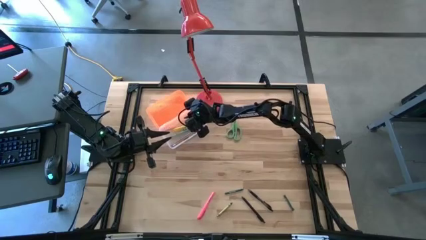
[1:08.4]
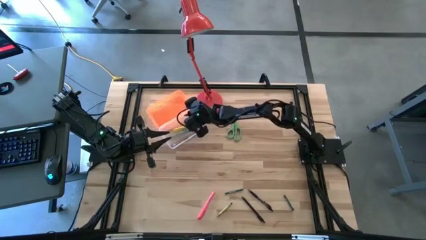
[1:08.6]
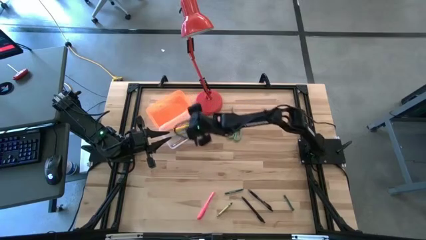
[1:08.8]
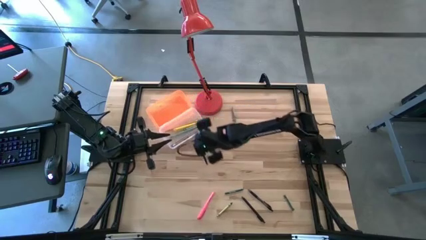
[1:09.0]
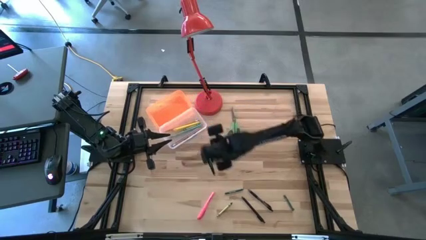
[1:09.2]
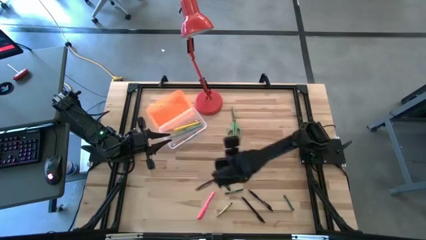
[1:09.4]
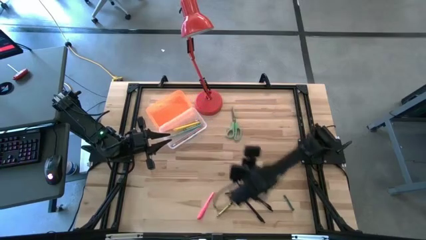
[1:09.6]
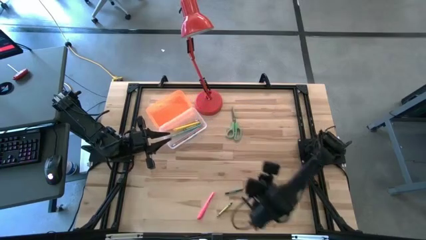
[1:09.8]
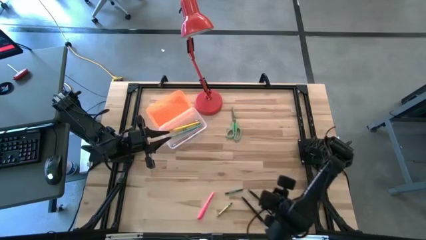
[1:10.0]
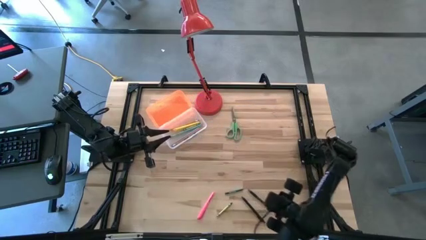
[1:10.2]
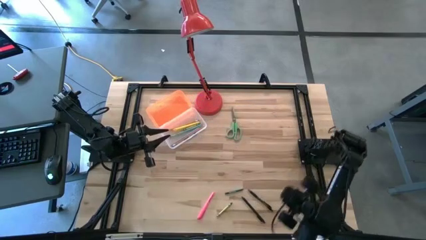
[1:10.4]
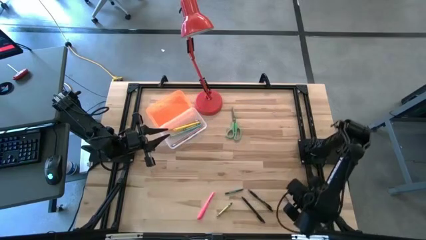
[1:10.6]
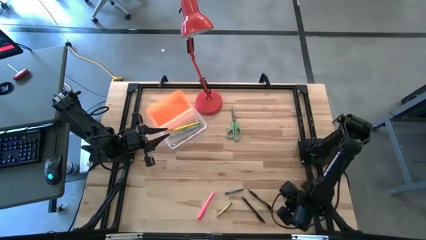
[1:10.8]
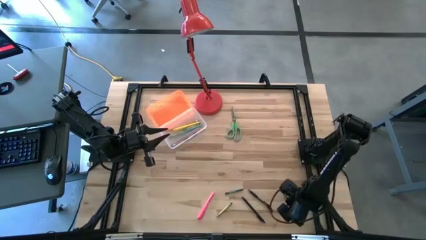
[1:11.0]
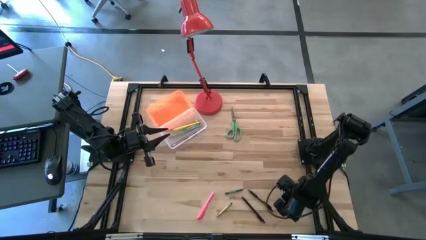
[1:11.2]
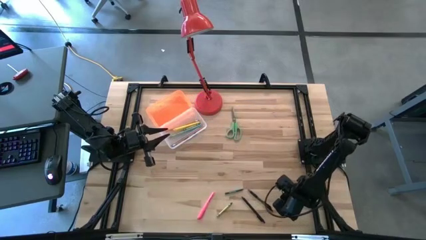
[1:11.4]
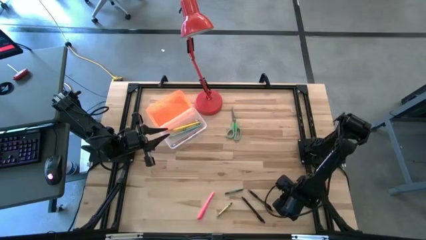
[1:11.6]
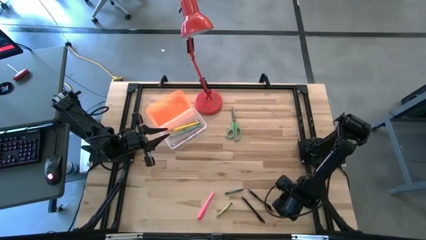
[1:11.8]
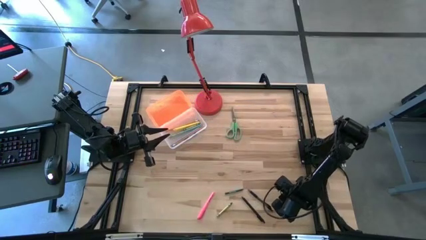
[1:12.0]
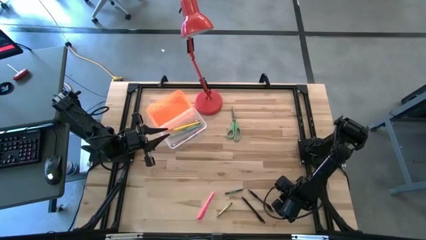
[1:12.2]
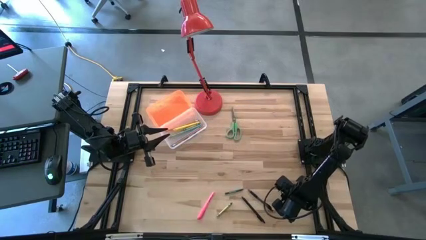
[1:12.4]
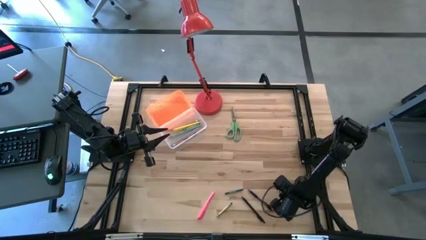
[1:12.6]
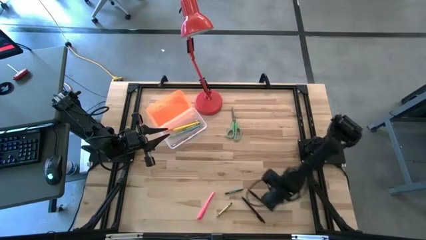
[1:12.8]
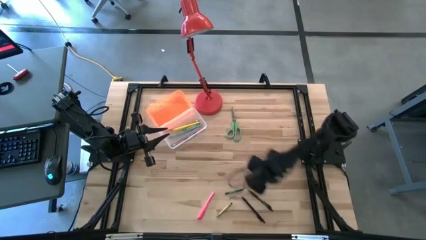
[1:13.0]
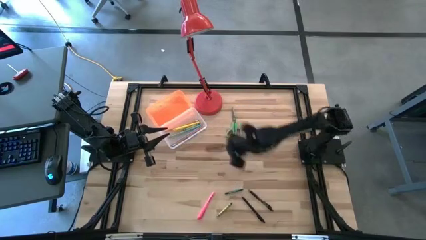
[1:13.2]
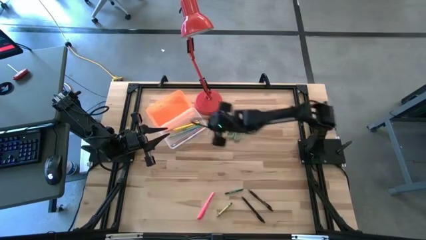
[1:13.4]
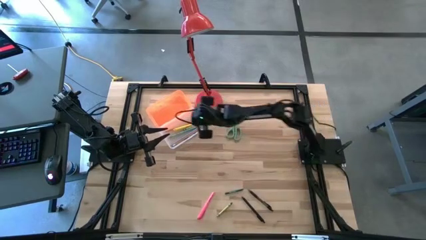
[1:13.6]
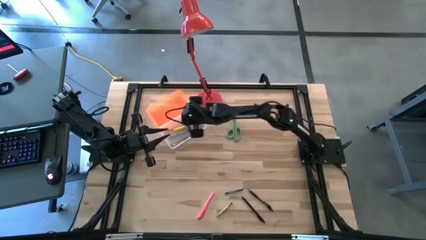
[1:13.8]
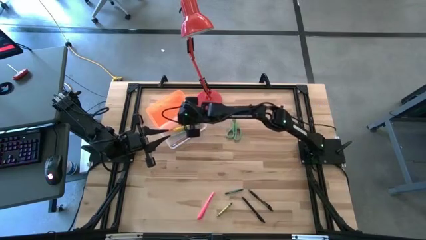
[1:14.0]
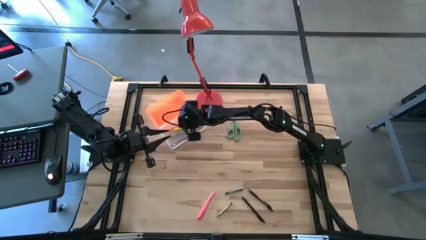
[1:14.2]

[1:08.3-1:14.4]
Task: Pick & place school supplies into a supply box
Put the right green crayon into the orange supply box

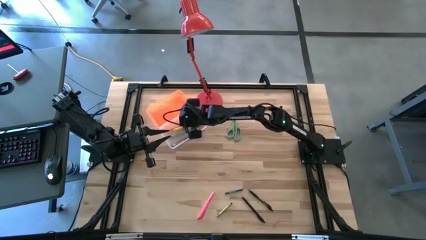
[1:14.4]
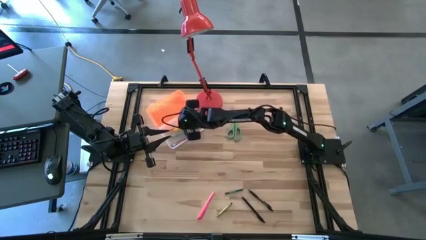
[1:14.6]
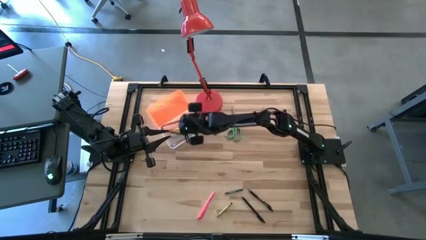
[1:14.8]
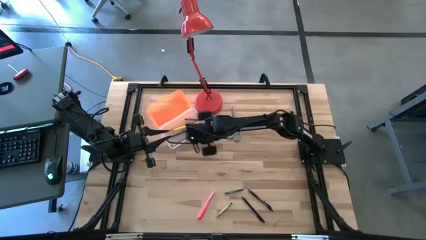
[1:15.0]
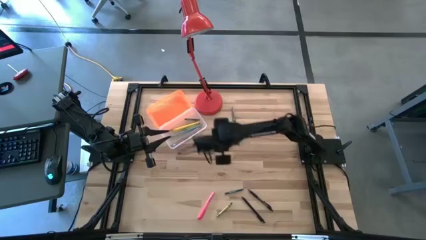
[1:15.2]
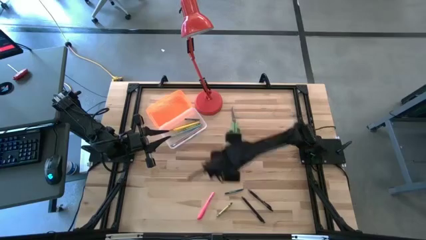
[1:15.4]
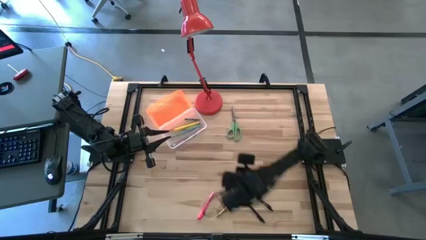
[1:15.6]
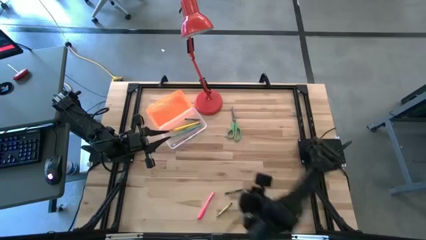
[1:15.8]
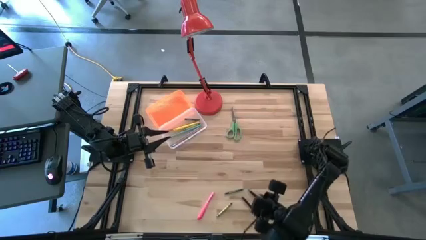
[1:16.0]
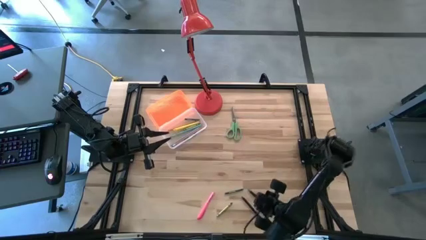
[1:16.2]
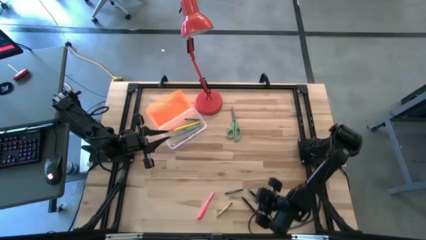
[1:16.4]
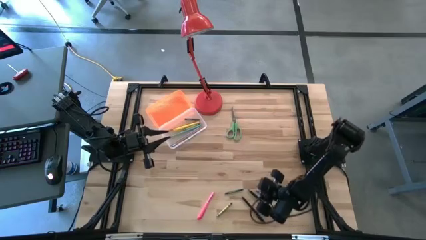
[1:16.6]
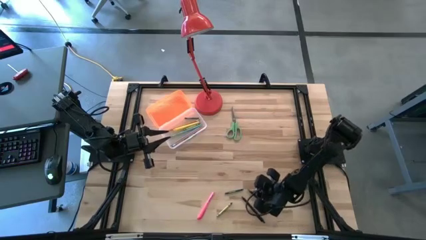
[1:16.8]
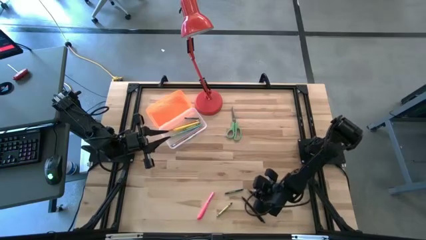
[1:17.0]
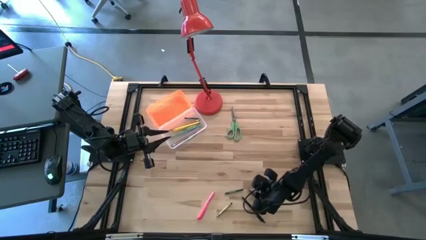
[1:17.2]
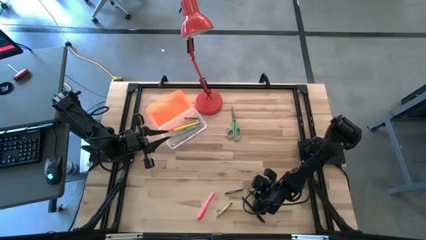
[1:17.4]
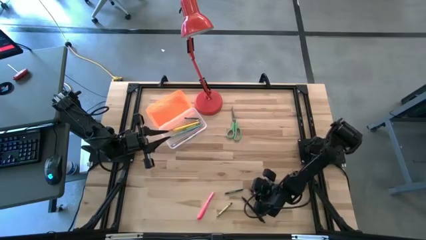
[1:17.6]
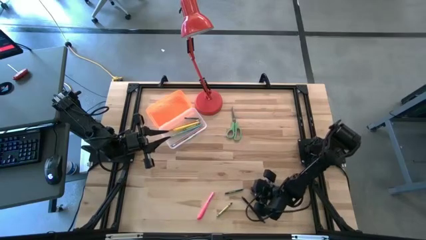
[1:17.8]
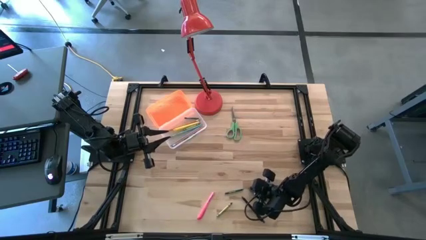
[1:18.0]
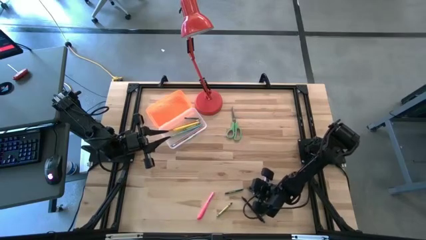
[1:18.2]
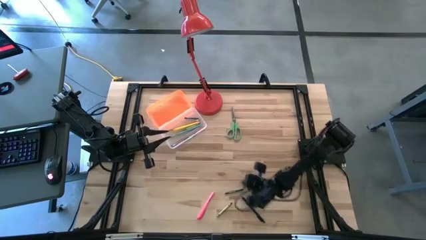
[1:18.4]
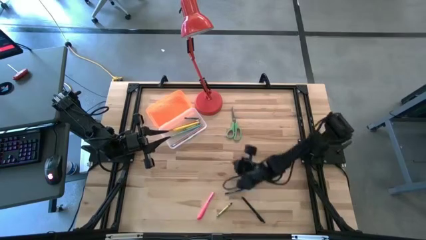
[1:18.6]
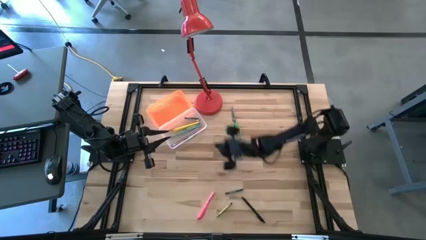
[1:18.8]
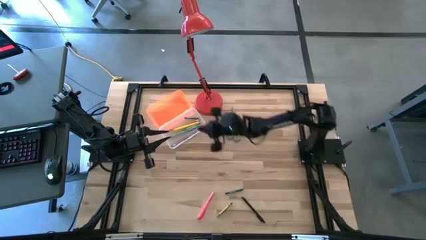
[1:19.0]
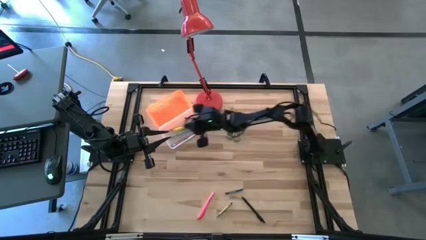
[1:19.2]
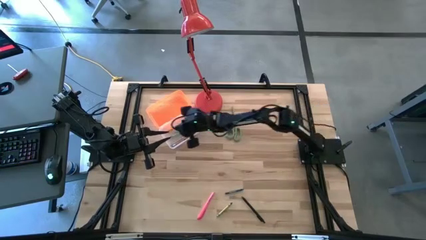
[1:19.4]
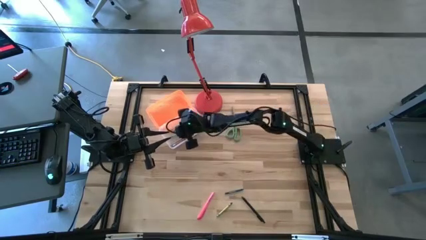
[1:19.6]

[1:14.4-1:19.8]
Put the black transparent pen into the orange supply box

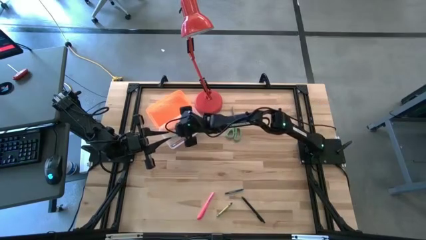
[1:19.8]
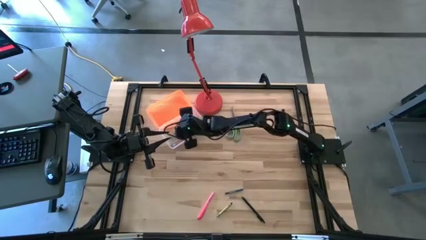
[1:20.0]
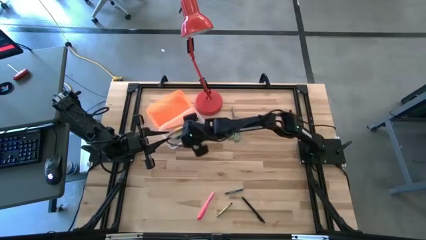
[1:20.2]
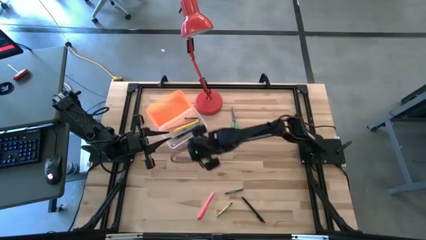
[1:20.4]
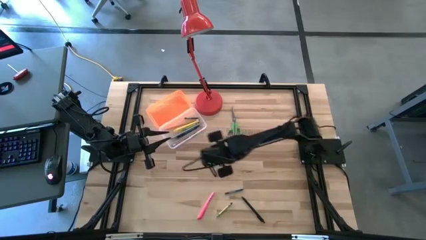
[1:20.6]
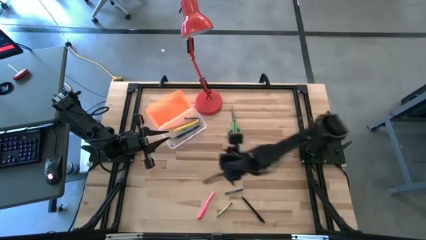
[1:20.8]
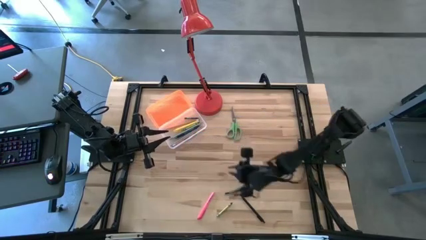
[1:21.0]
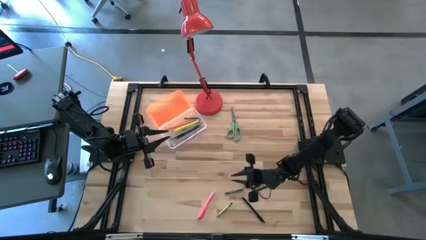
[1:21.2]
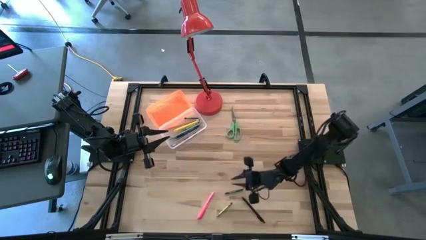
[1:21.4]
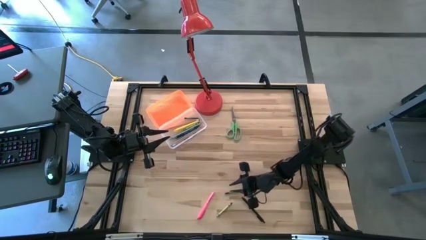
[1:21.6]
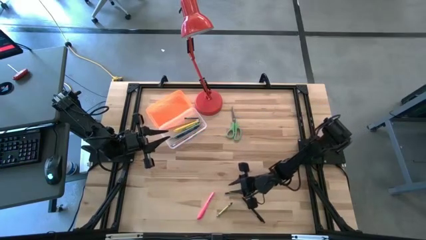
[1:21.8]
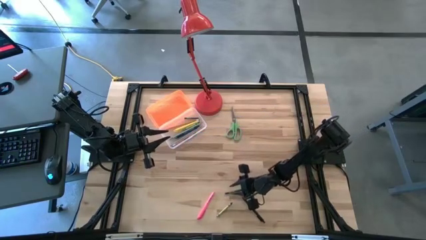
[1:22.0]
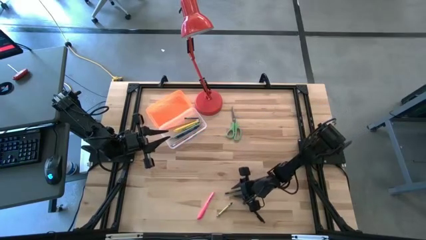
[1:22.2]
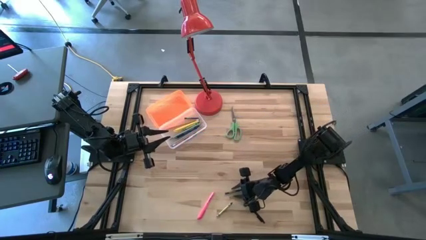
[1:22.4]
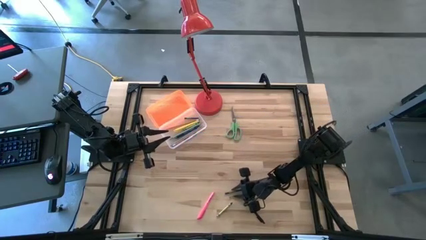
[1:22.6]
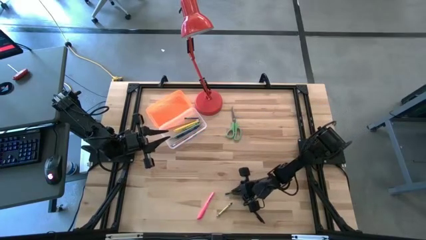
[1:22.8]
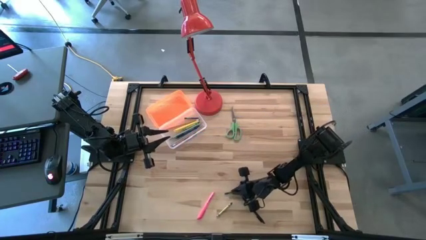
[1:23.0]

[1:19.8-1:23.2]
Put the green crayon into the orange supply box

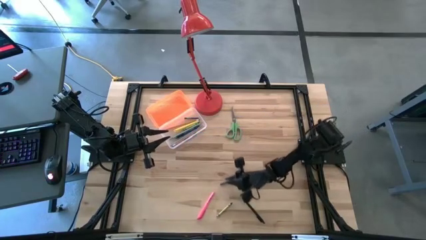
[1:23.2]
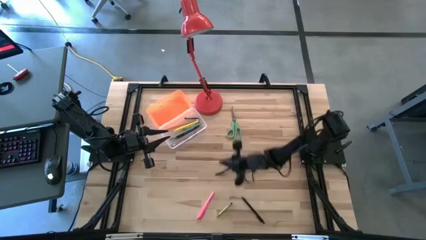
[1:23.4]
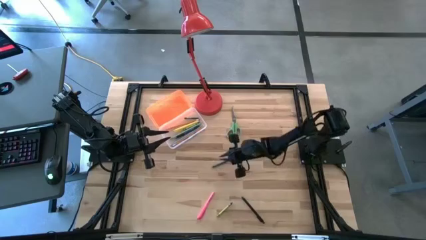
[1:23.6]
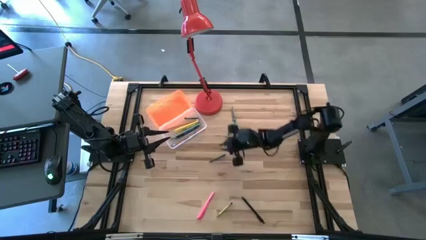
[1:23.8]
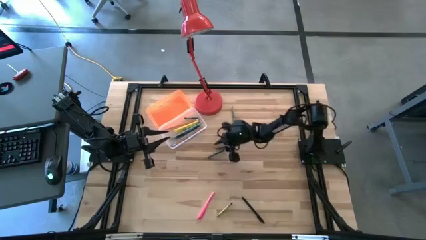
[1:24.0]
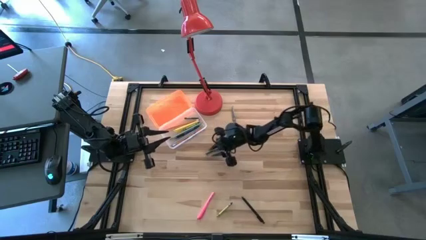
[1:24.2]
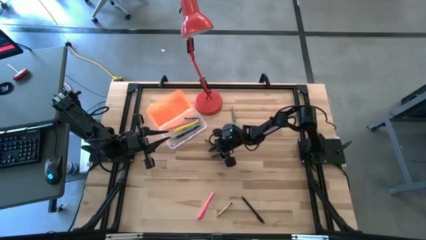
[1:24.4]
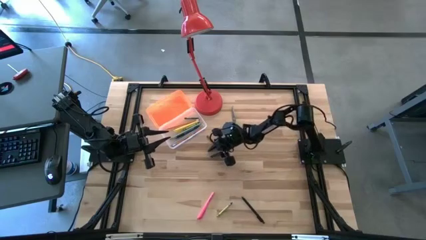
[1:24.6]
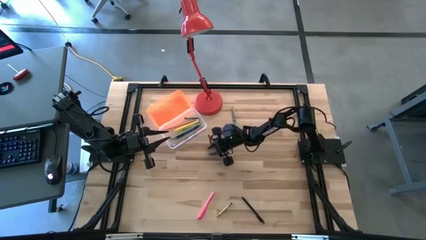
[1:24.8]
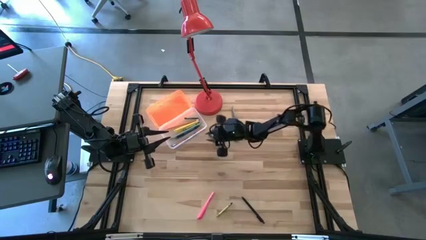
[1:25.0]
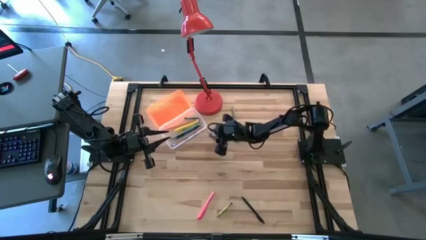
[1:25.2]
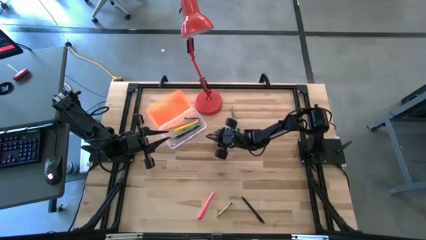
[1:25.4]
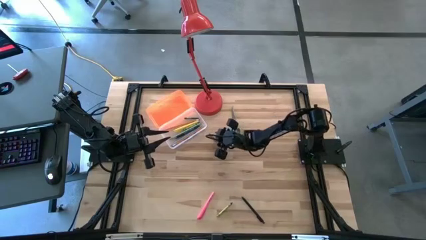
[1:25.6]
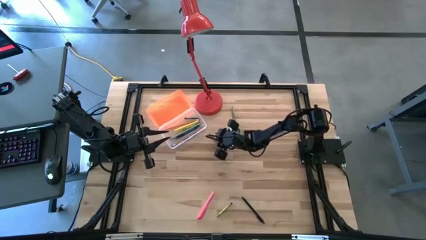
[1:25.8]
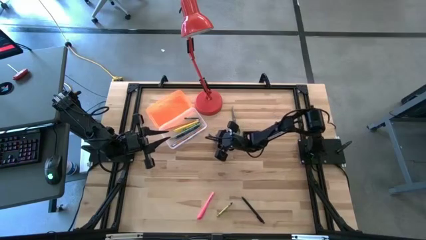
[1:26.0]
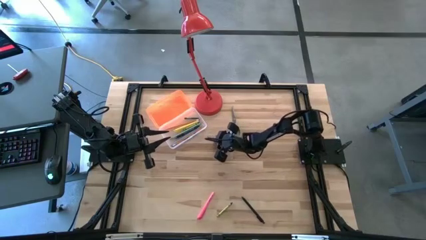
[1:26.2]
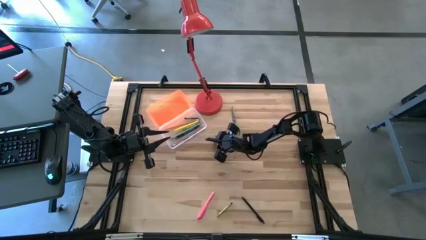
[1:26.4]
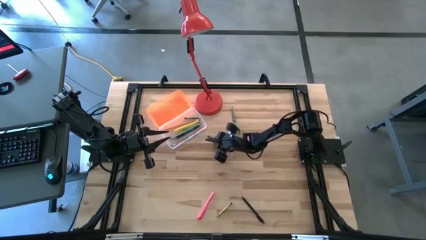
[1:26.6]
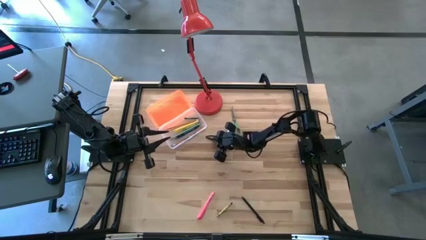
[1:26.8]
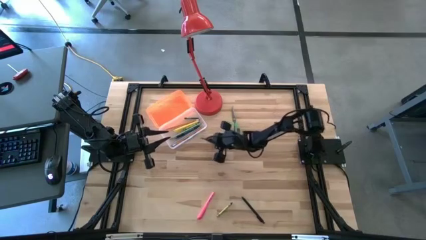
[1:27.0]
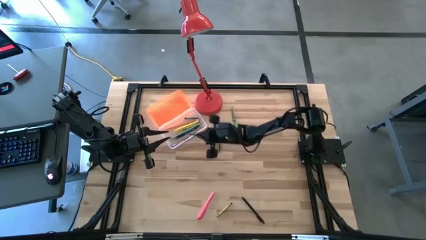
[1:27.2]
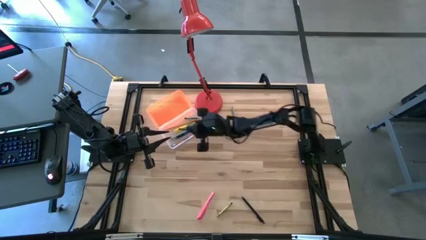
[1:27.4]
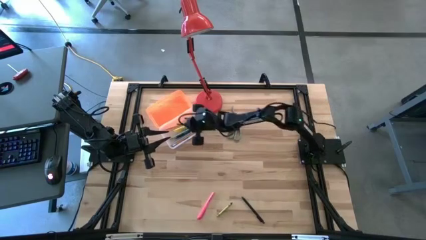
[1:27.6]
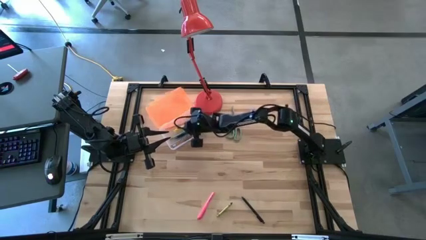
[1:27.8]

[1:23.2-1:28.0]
Put the green crayon into the orange supply box
